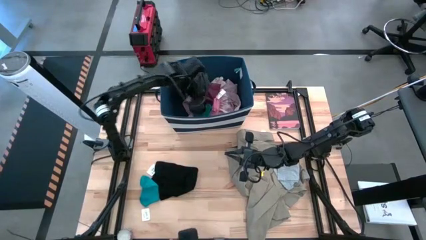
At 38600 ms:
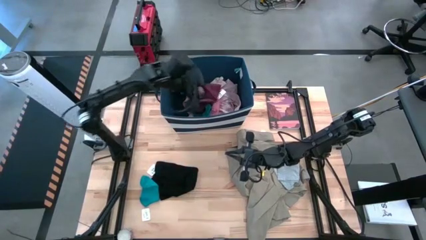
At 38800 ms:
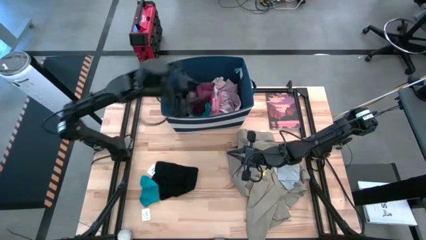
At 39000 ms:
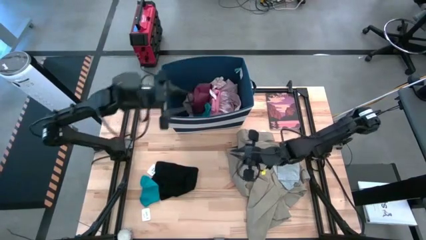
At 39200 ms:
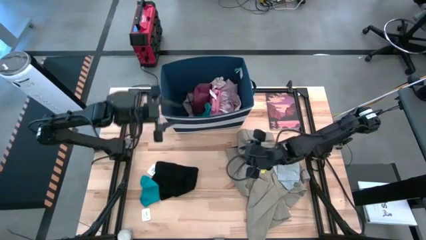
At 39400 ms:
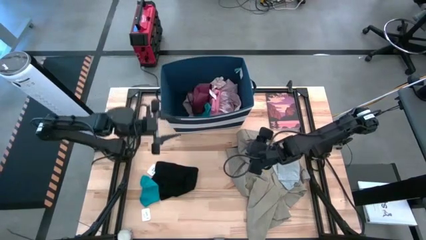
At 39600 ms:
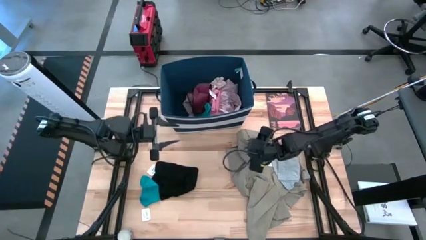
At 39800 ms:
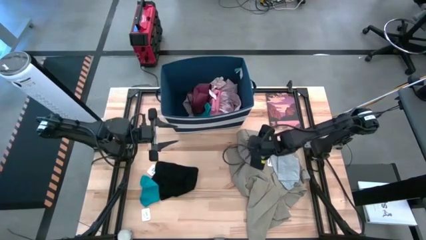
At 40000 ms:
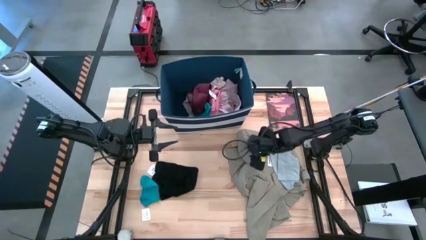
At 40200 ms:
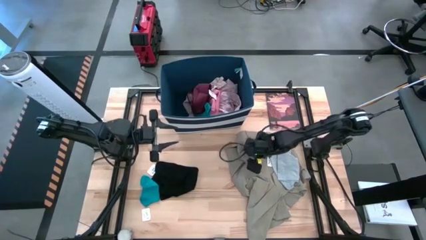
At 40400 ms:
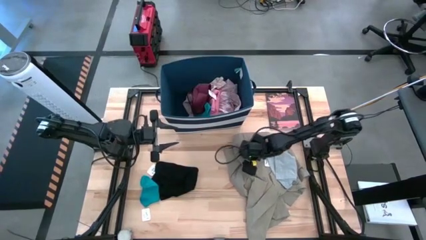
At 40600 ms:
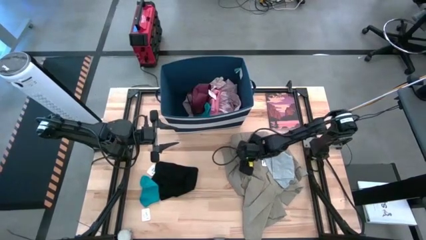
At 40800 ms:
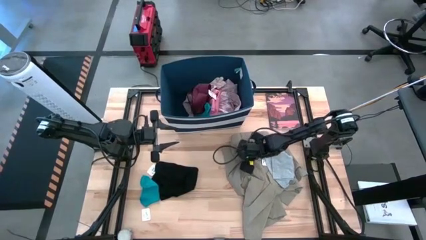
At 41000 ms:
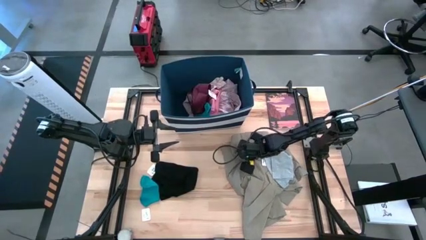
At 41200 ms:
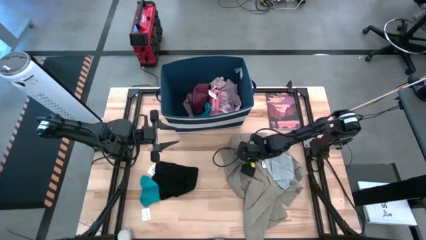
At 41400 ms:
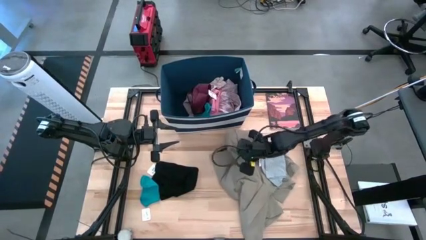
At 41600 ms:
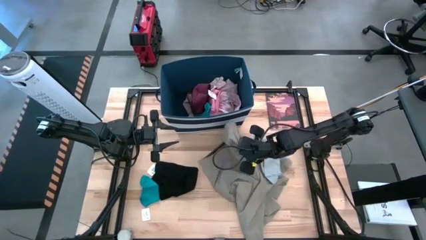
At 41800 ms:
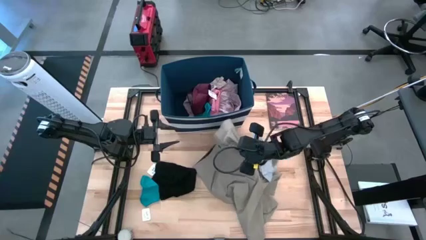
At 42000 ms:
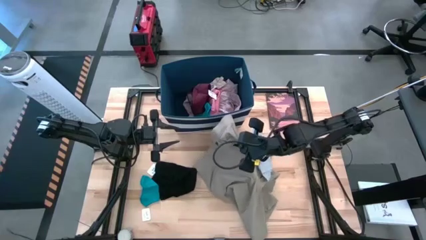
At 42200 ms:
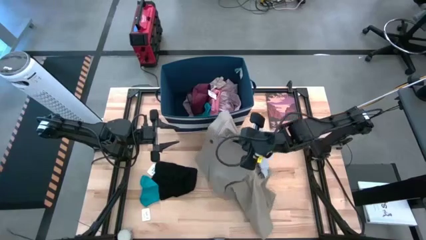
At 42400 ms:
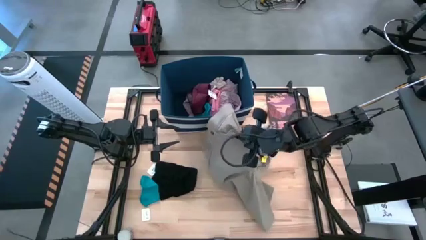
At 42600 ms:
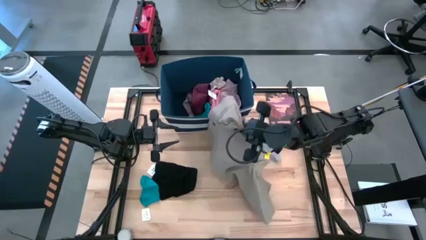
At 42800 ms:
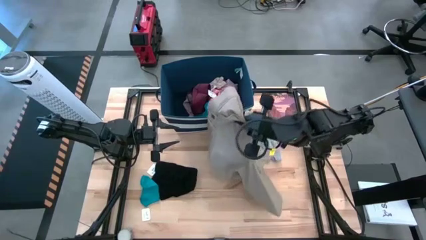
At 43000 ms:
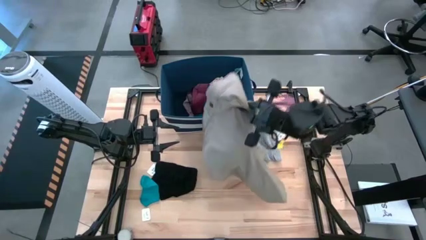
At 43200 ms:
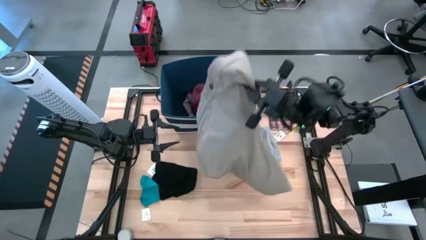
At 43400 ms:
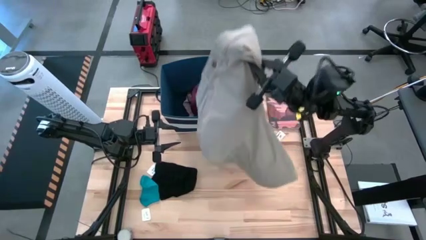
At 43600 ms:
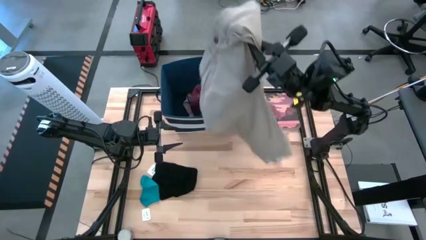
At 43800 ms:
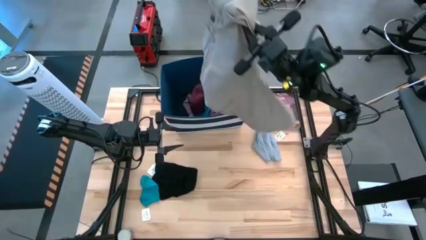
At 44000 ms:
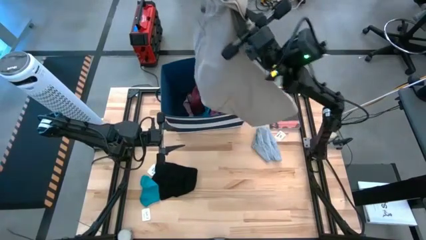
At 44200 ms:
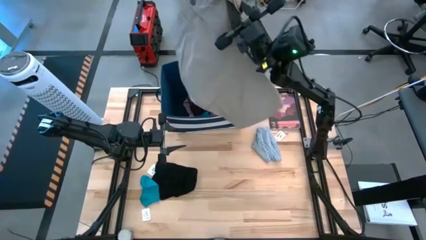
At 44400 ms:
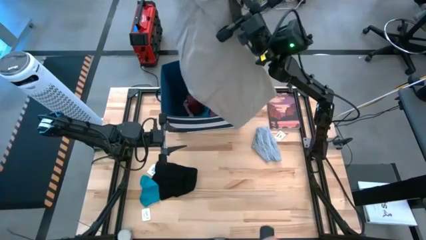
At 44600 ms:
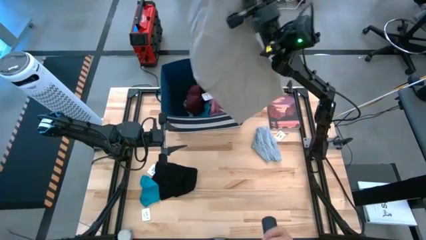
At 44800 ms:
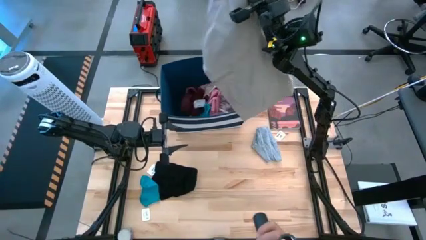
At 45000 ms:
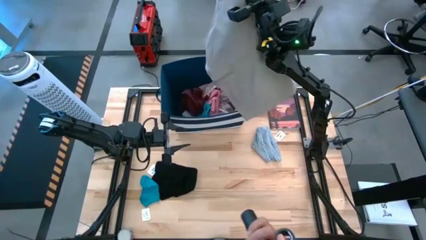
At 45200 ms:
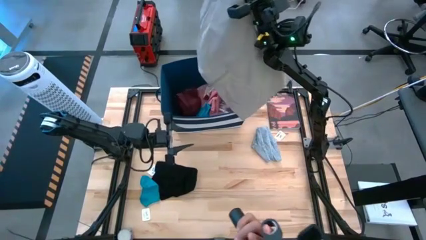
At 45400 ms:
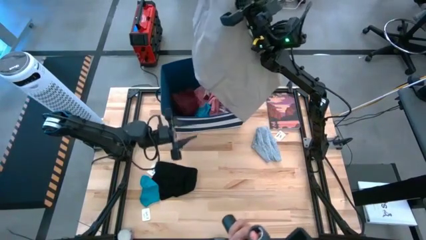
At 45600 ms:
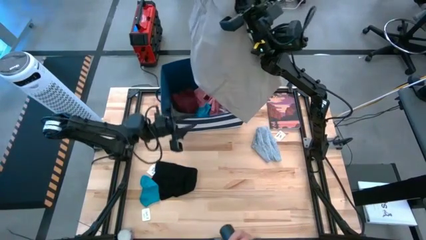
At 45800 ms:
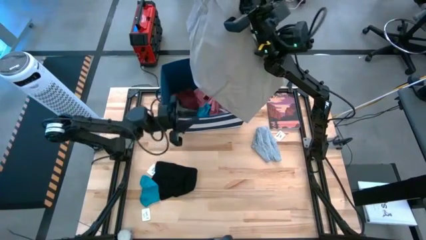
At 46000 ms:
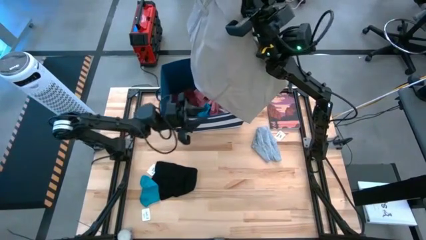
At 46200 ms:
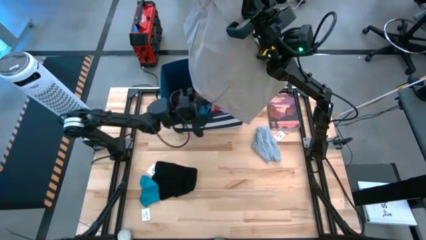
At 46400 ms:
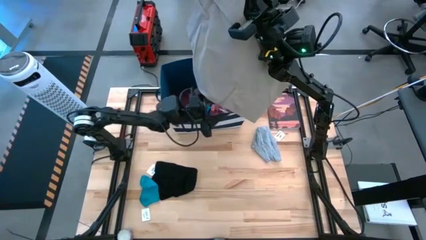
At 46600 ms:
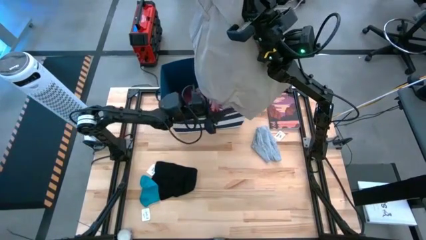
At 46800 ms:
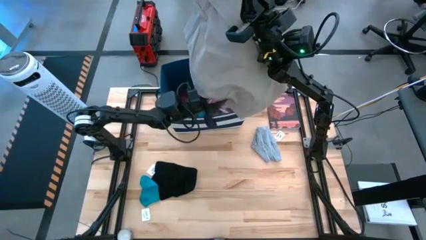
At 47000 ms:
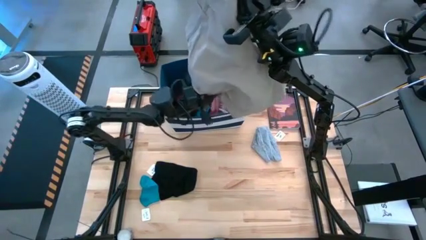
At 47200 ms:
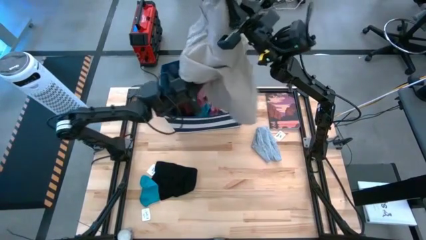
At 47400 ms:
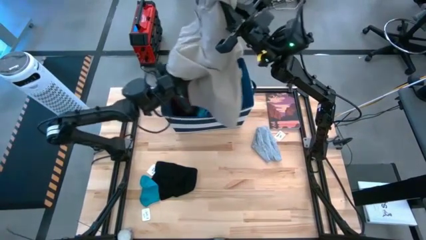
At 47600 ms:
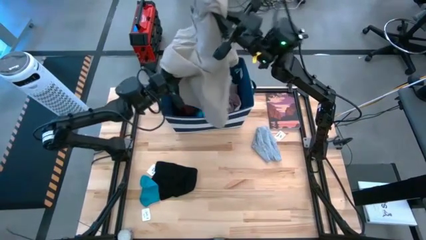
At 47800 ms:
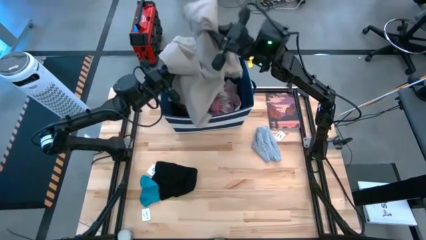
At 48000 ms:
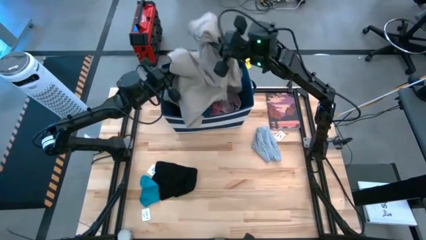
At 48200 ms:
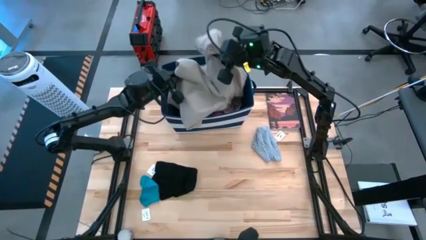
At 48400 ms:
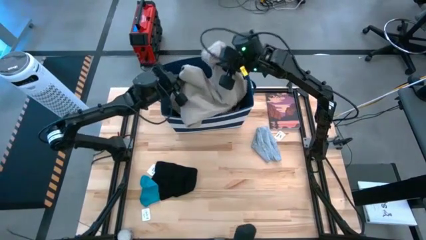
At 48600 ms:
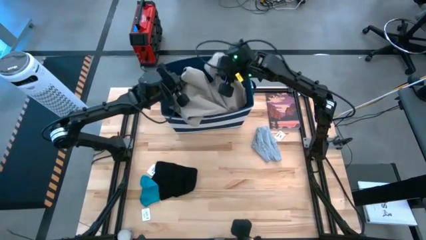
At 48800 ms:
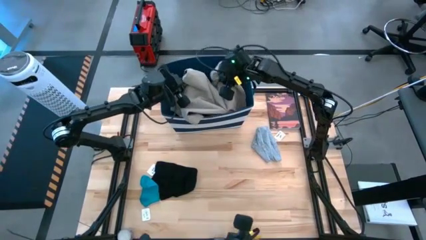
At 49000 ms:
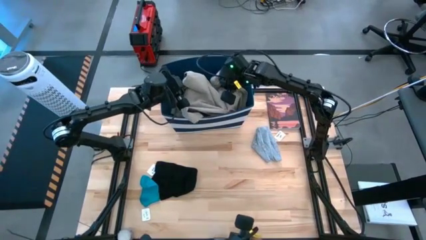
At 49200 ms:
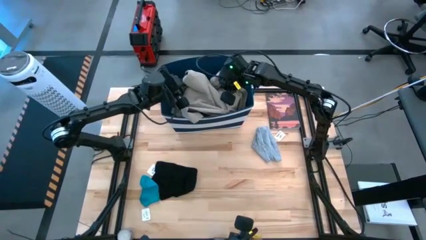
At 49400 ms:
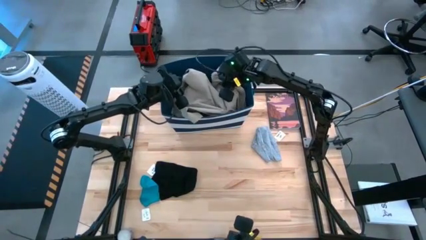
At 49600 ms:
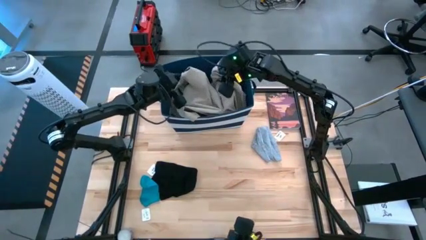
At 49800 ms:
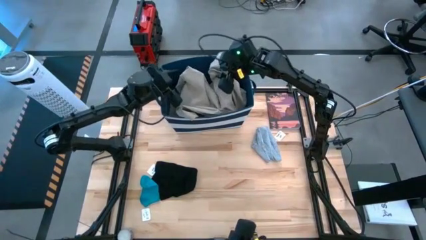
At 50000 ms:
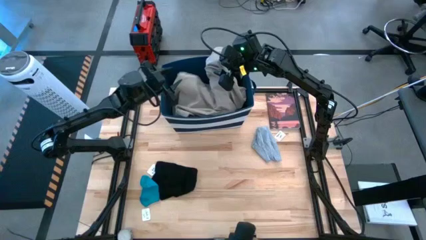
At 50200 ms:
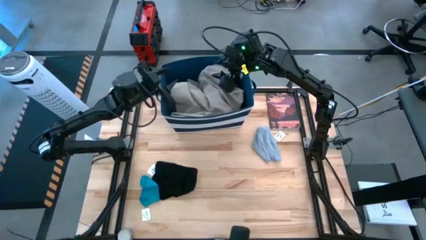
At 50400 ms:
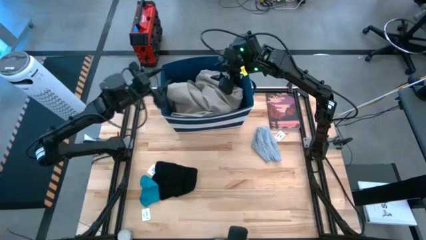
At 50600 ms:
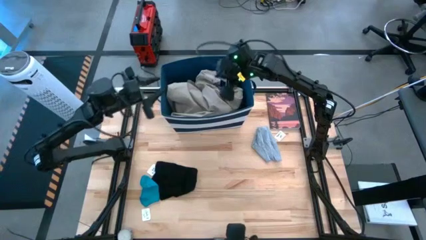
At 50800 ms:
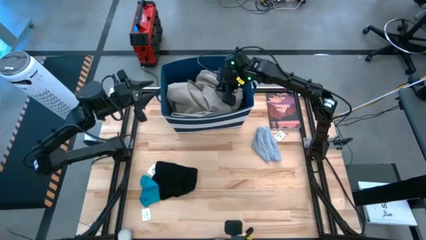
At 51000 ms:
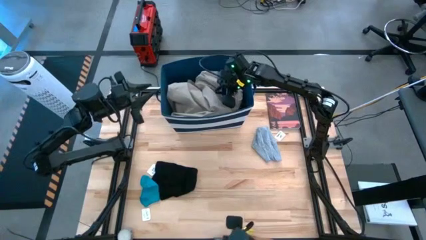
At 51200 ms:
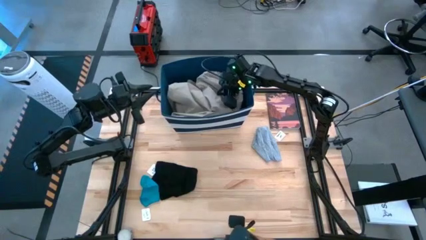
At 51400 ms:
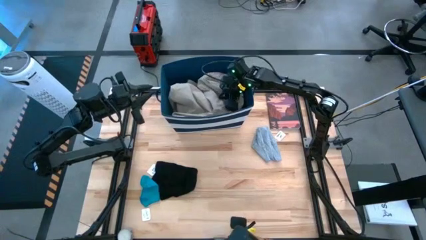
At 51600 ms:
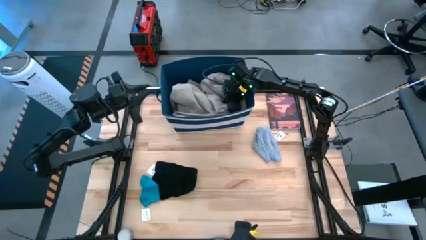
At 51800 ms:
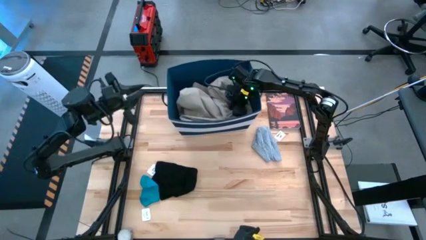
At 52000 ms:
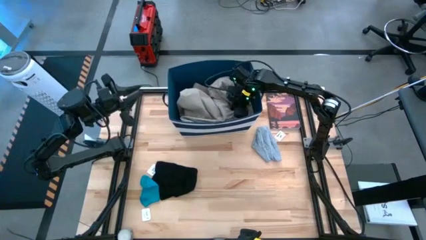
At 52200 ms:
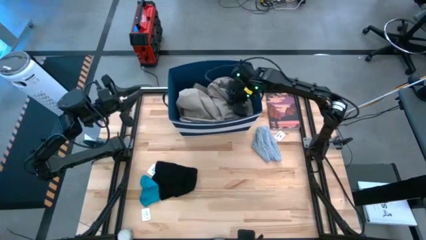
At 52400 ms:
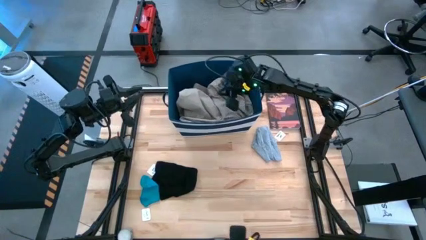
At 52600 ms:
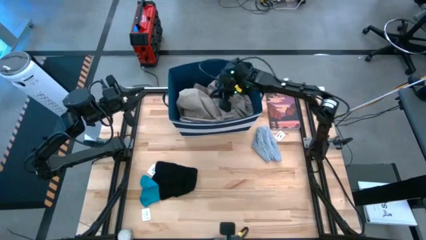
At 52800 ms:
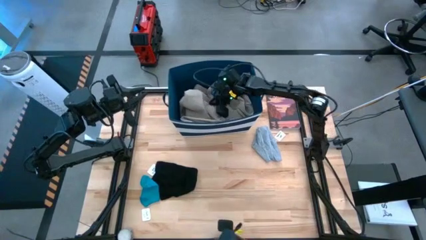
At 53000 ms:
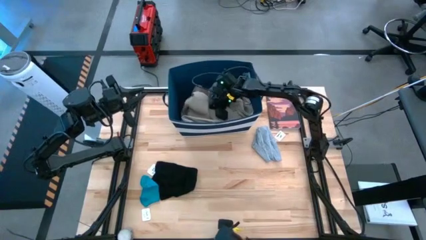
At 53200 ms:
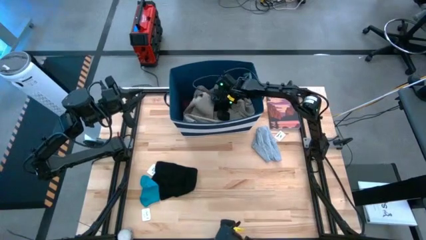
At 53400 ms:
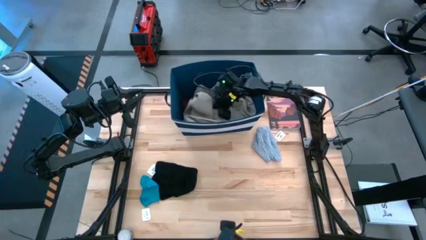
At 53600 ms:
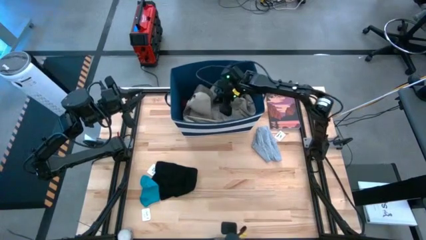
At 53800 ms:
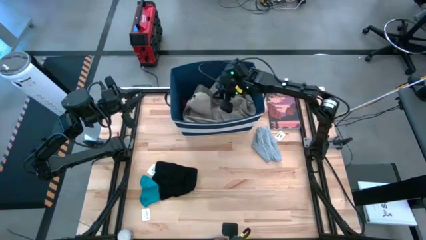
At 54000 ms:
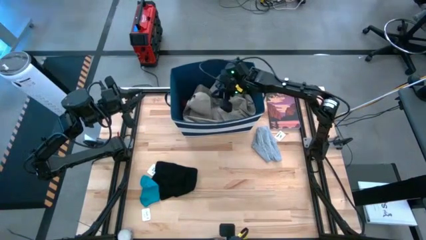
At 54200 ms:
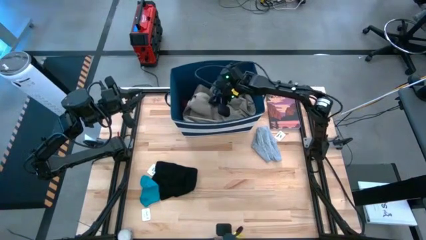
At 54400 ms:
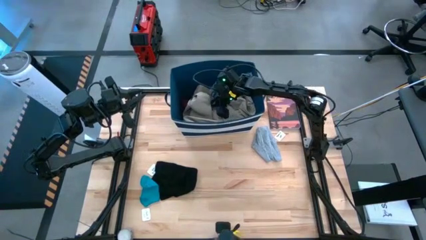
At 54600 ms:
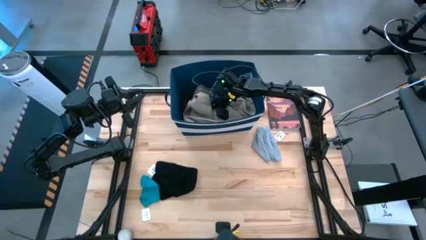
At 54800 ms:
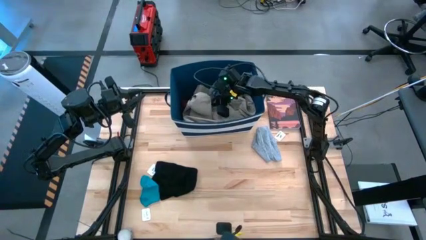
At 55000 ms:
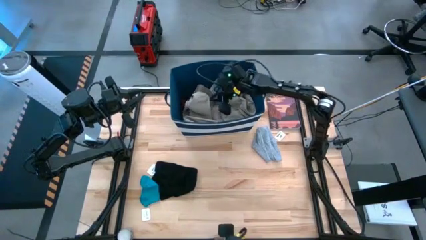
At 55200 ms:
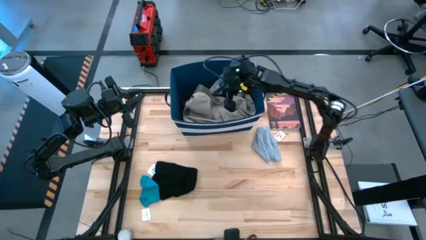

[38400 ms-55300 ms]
Task: Sort clothes
Put the gray shorts into the blue laundry bin
